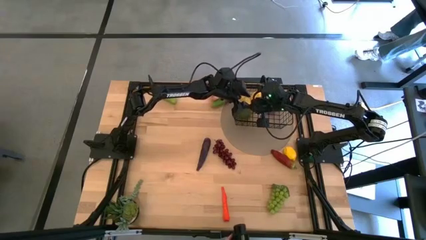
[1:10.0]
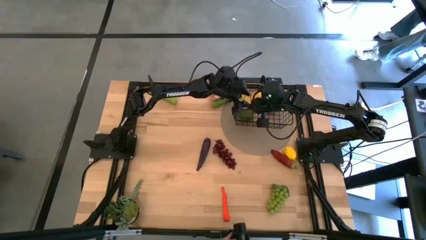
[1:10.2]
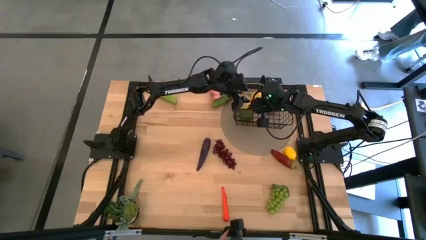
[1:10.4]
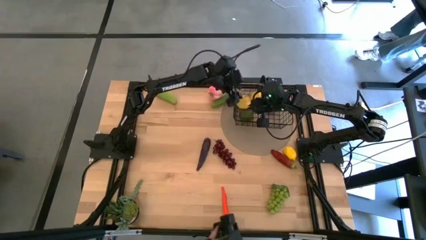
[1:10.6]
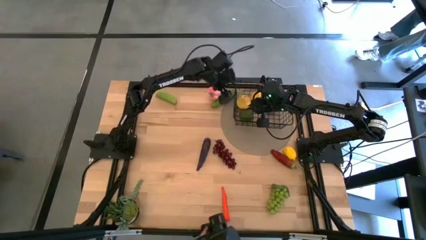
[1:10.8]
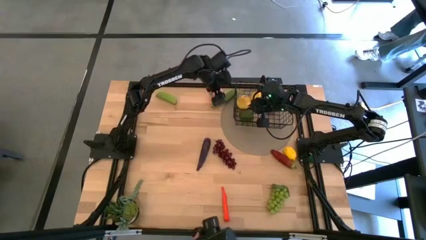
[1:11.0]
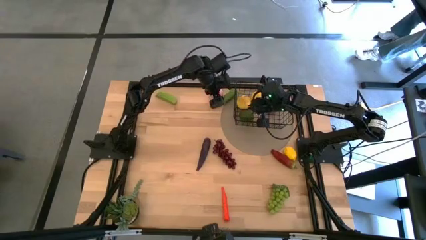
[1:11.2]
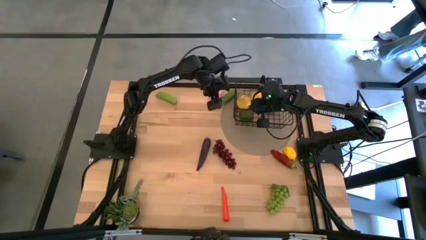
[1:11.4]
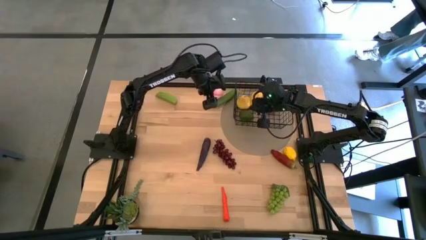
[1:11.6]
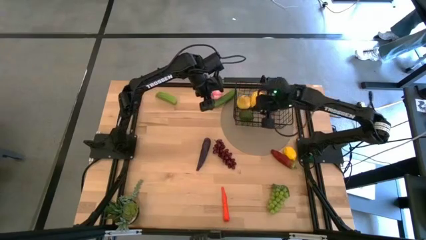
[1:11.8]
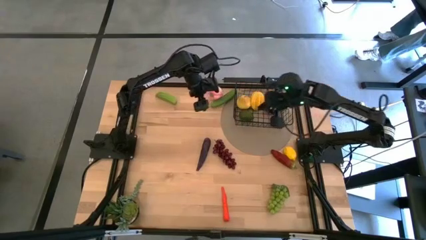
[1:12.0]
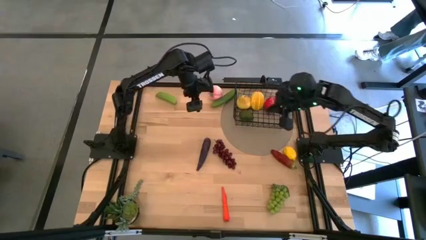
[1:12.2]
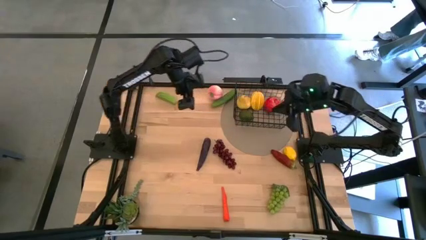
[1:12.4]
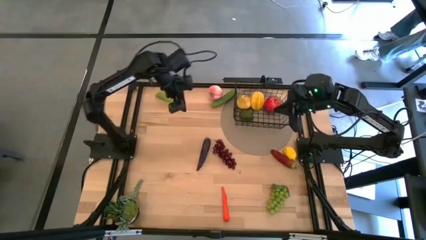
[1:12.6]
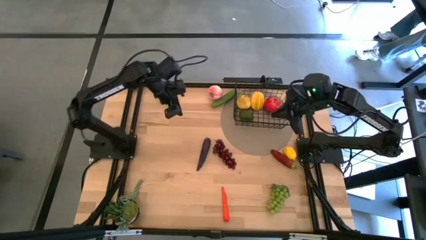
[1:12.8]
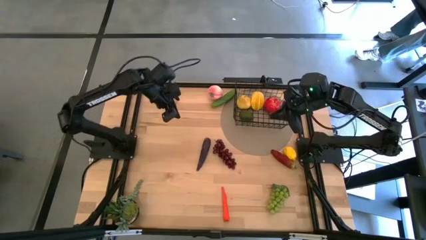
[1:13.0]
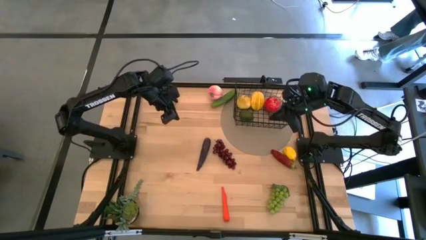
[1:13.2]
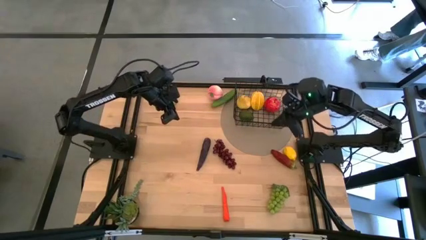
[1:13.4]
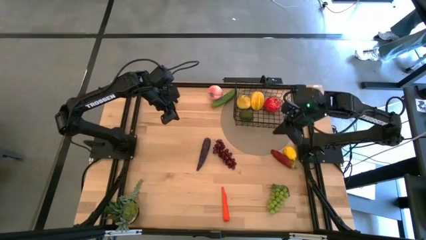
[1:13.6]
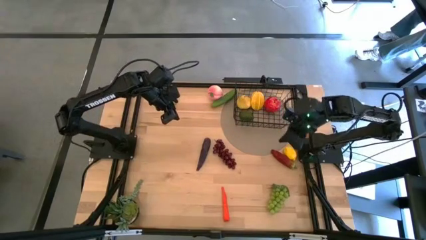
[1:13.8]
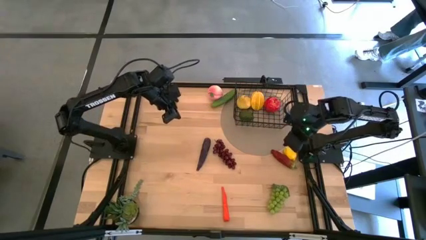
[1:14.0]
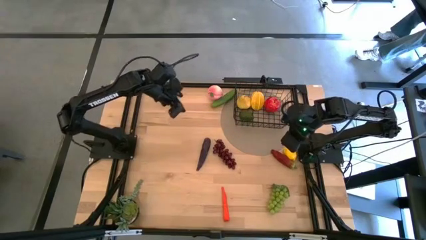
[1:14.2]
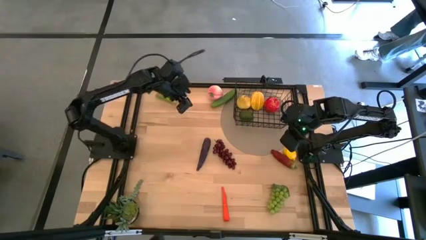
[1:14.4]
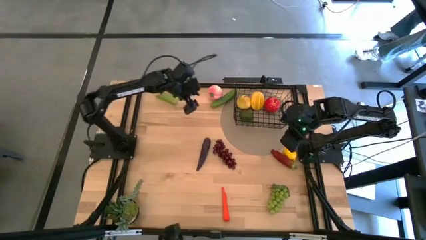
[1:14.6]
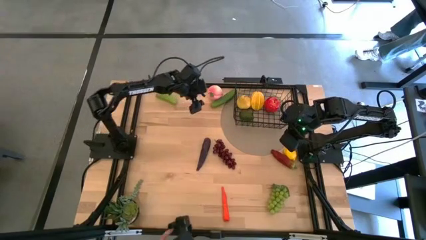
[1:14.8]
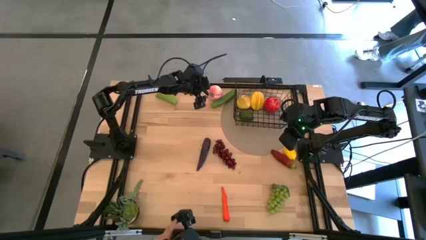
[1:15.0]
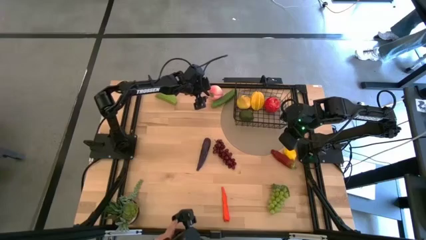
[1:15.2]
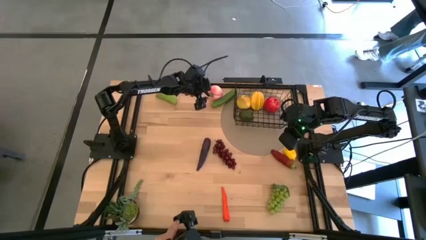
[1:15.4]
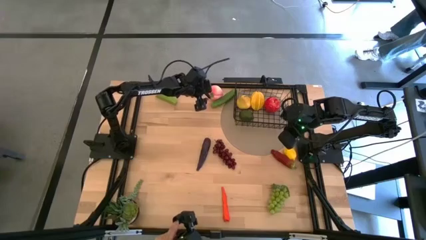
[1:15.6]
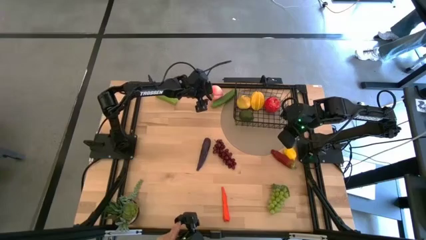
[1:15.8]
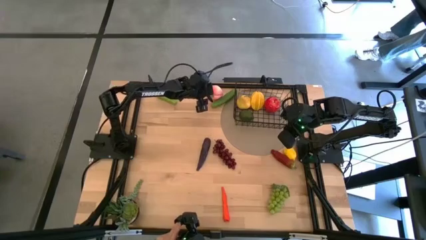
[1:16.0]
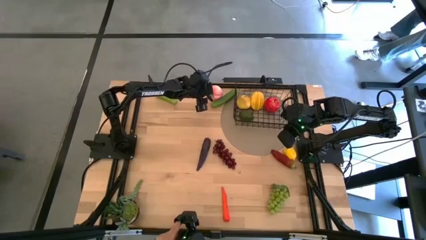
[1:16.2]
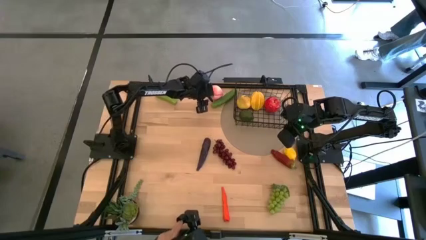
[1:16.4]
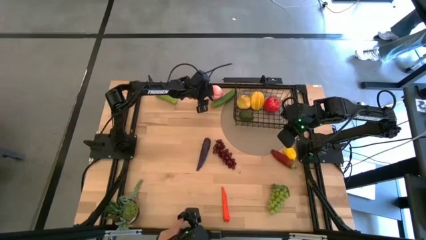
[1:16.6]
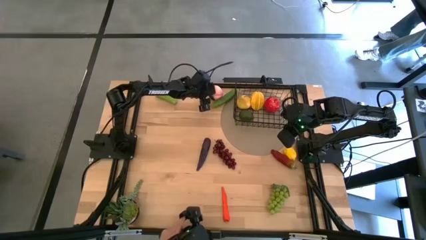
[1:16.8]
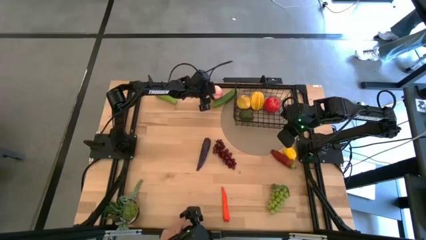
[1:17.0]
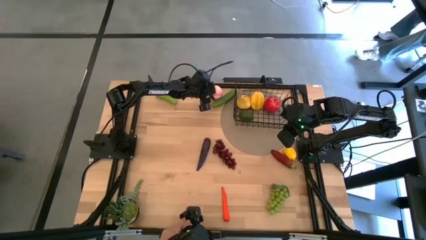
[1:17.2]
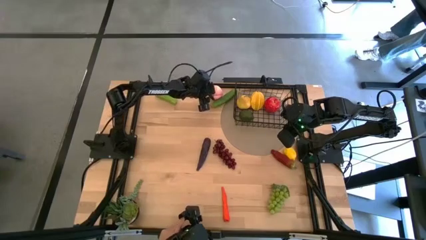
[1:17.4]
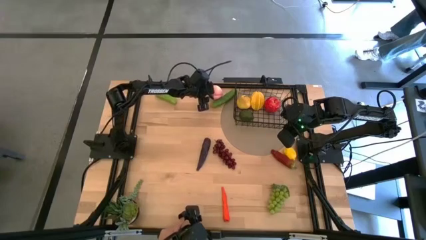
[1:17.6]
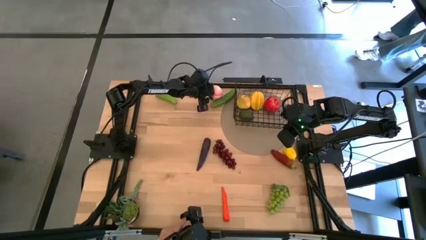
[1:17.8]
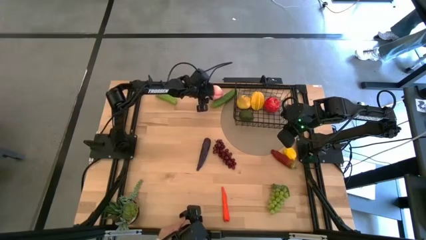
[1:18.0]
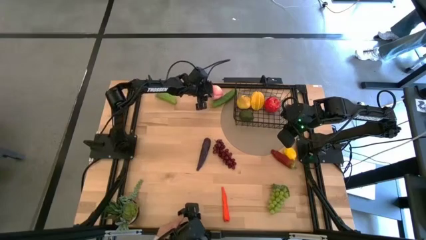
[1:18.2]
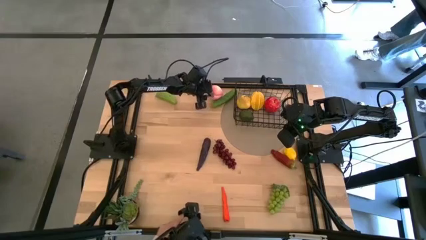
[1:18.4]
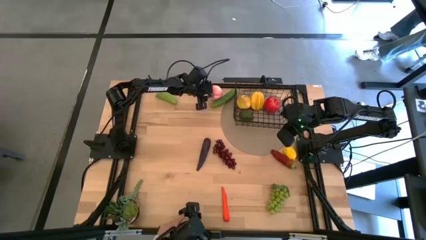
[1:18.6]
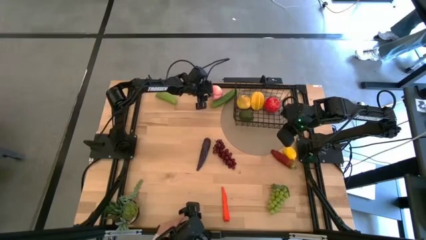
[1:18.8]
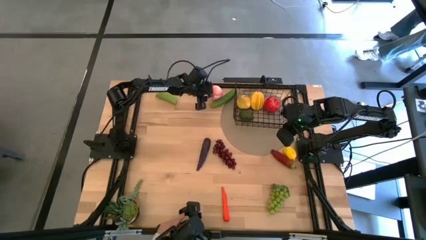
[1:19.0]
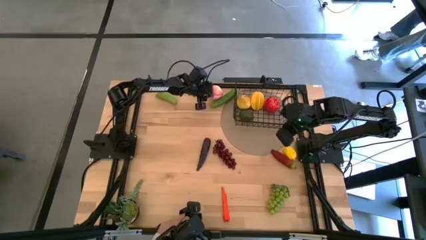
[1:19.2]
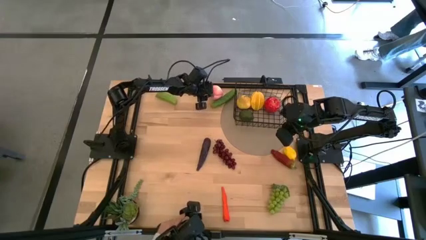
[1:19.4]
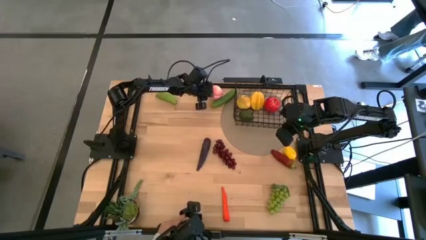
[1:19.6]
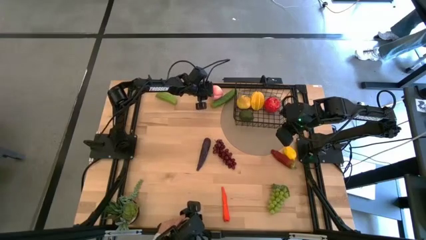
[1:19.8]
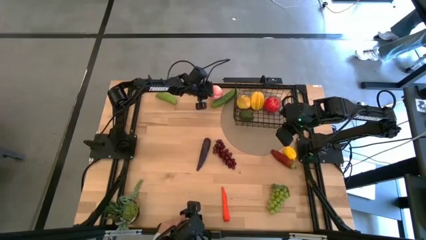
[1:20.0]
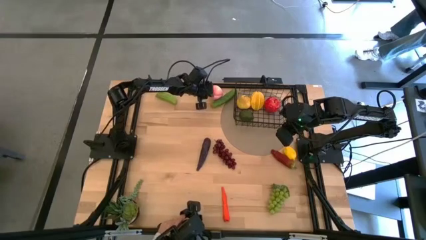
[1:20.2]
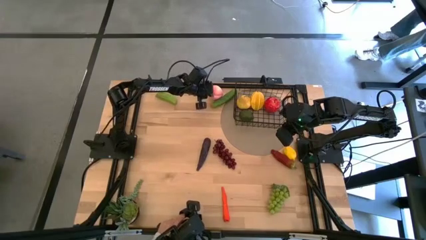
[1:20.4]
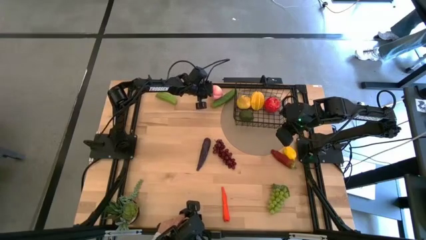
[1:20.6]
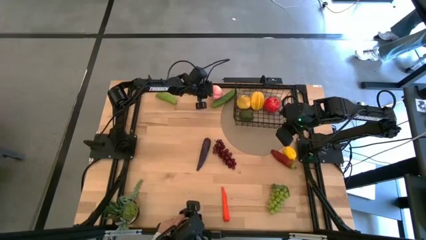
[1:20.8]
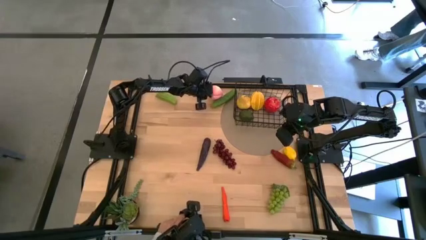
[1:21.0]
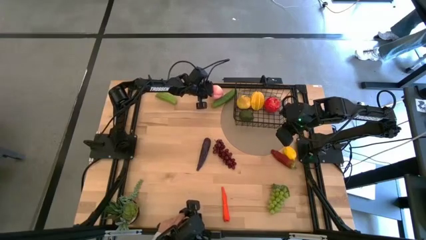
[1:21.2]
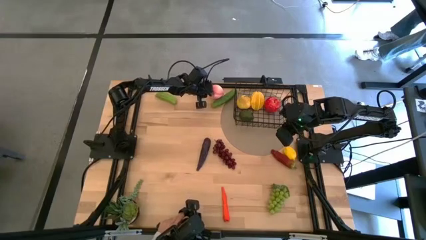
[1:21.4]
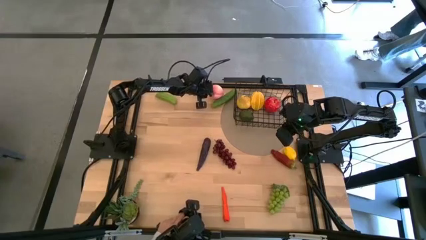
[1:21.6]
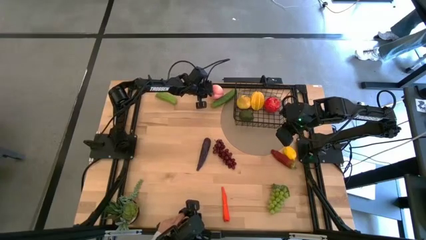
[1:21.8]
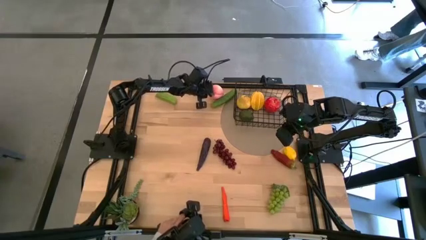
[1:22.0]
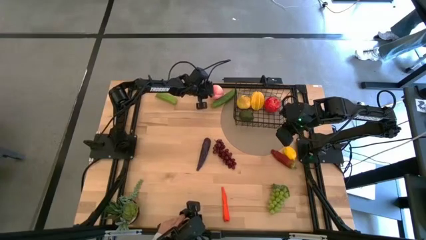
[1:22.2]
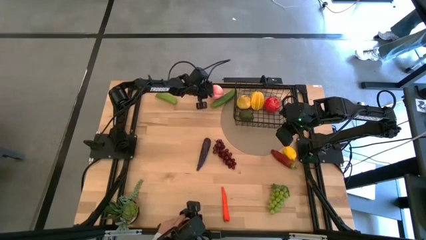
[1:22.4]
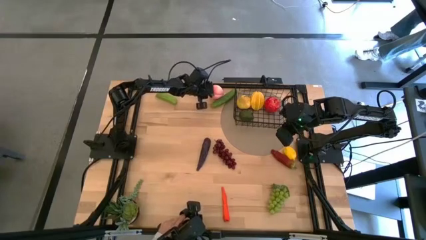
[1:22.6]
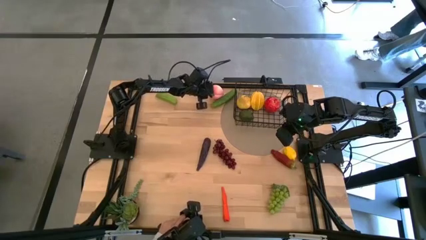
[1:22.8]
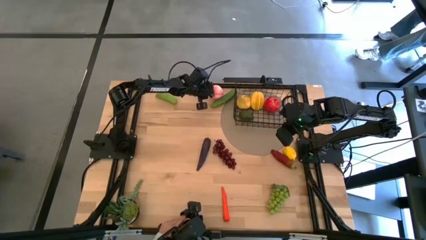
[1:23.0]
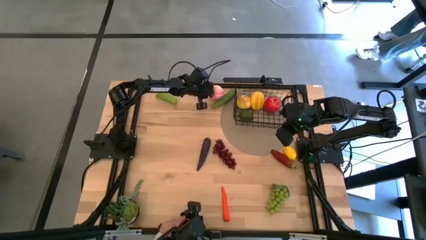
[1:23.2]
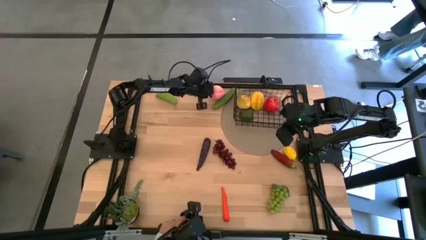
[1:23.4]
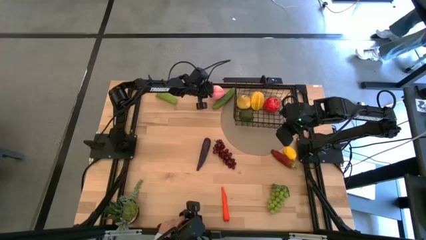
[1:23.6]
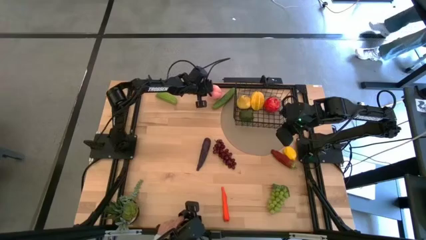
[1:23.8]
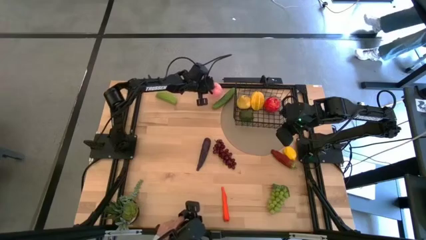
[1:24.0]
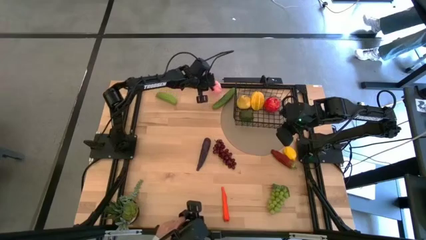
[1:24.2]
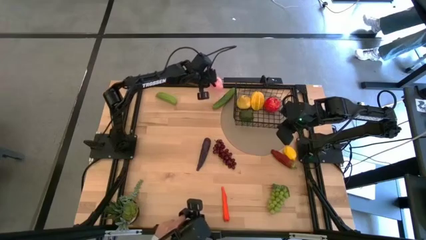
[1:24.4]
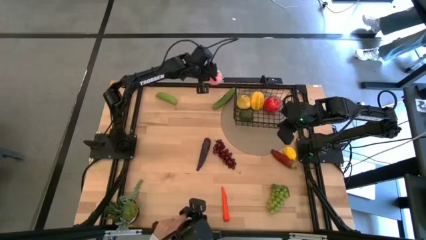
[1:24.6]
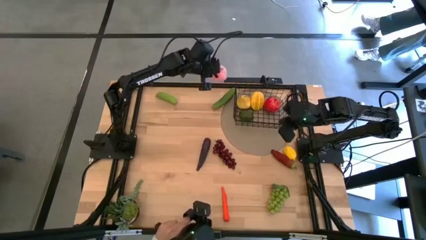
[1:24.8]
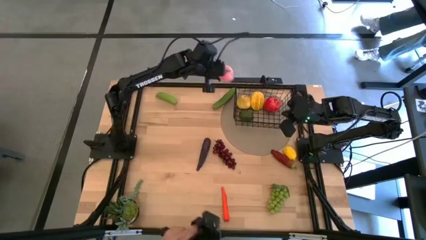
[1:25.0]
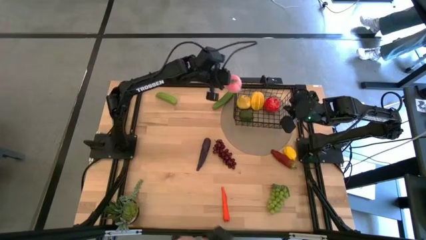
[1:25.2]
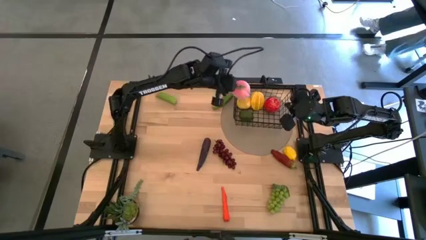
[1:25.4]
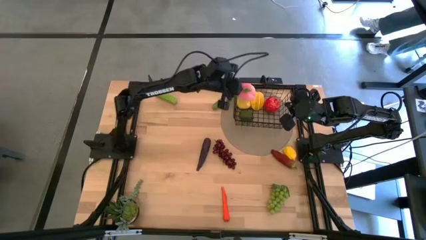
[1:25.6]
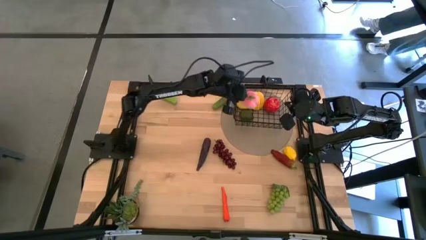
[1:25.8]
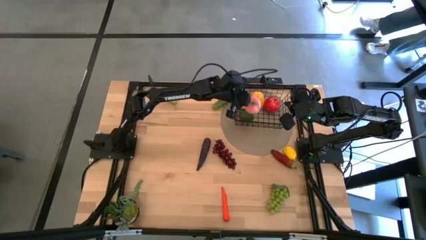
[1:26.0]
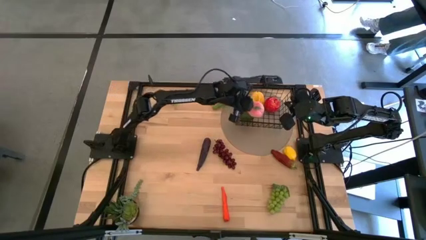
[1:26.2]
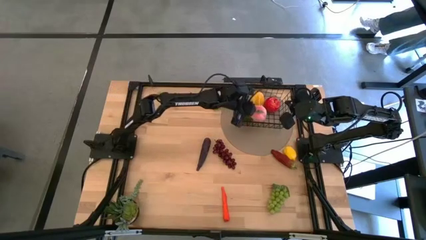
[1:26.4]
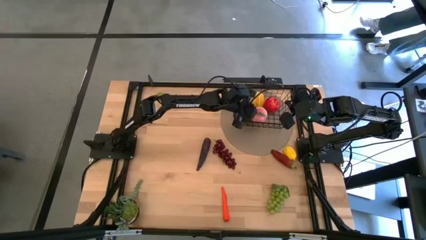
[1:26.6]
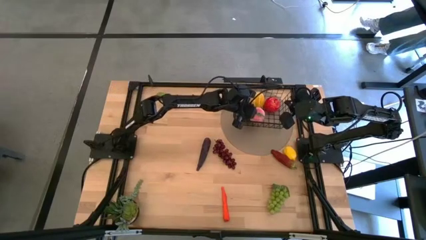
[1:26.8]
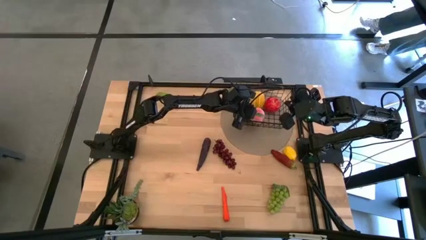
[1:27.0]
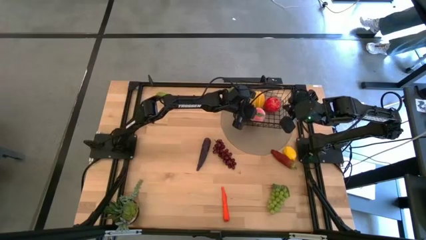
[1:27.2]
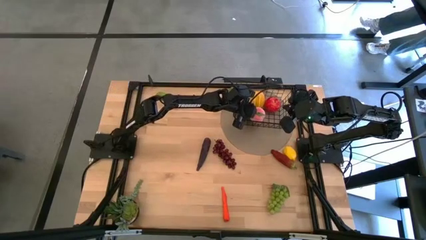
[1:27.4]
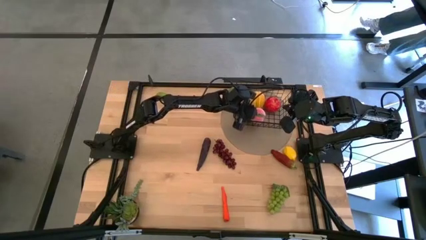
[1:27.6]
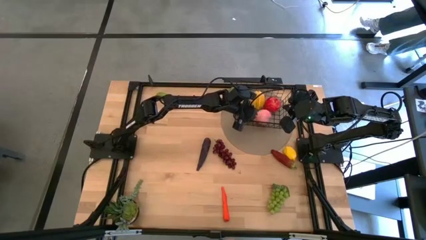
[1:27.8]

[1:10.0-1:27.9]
Task: Build produce basket
Put the pink peach into the black wire basket
